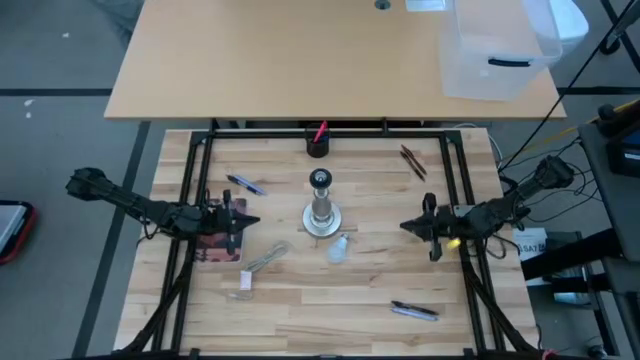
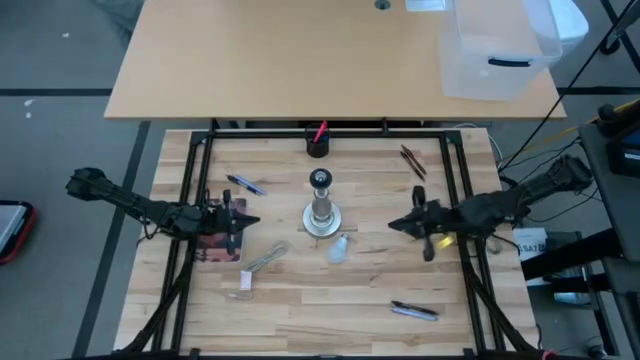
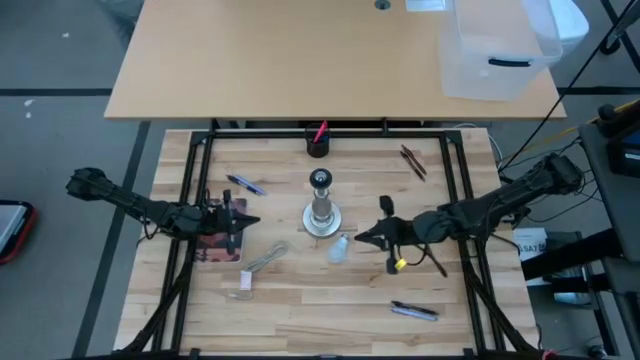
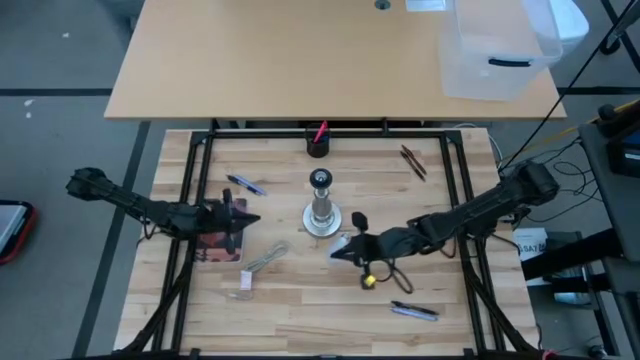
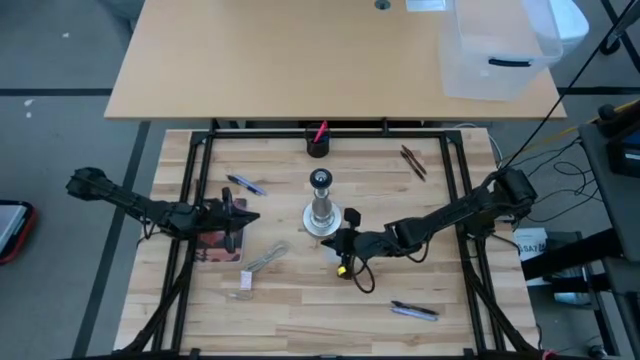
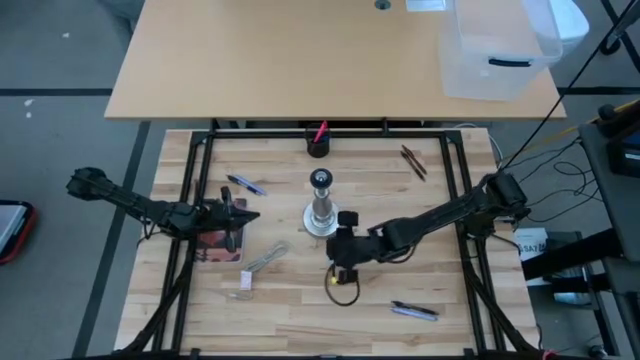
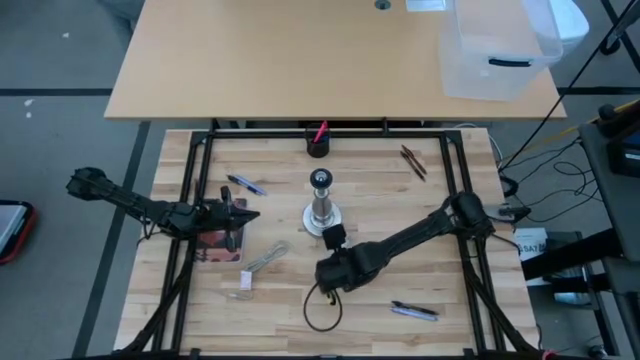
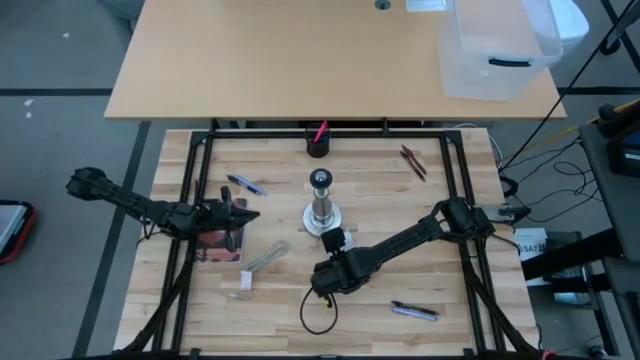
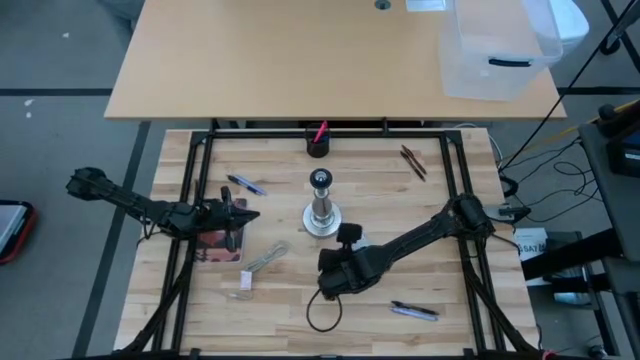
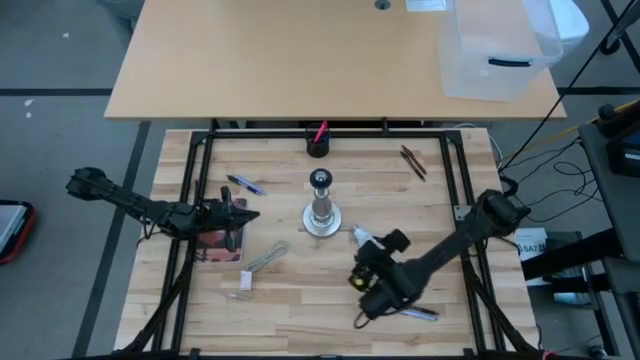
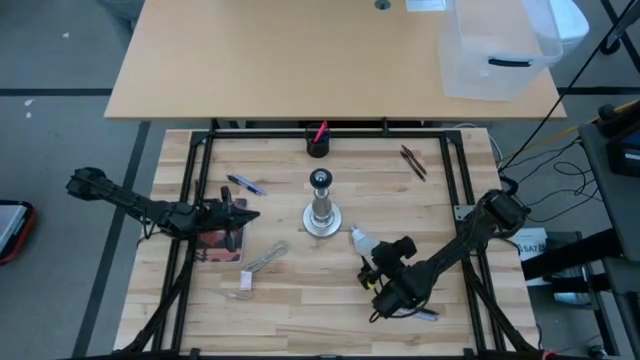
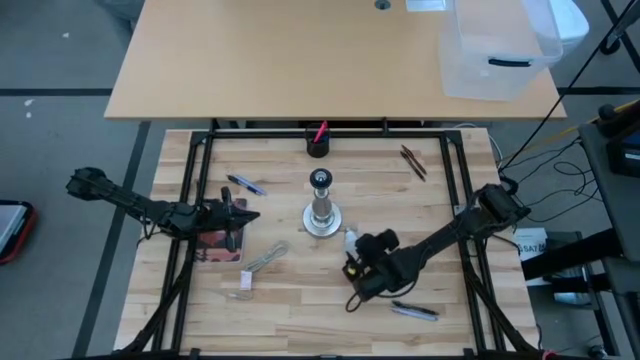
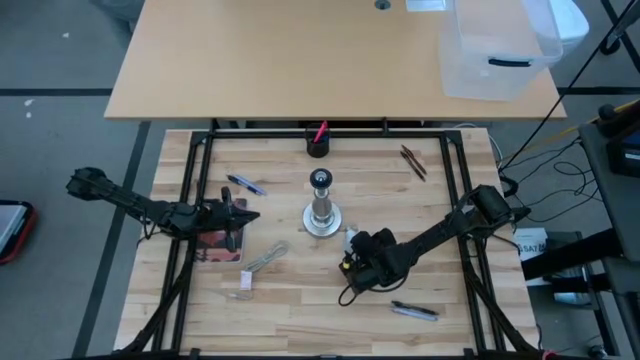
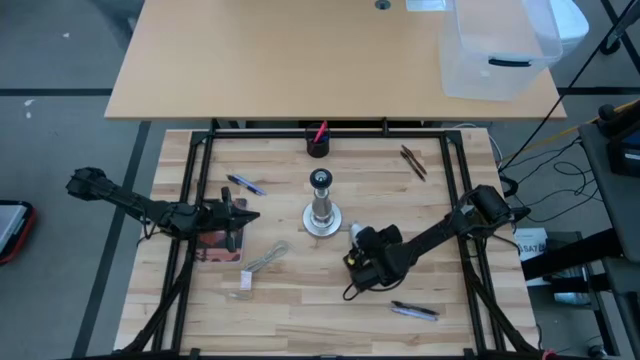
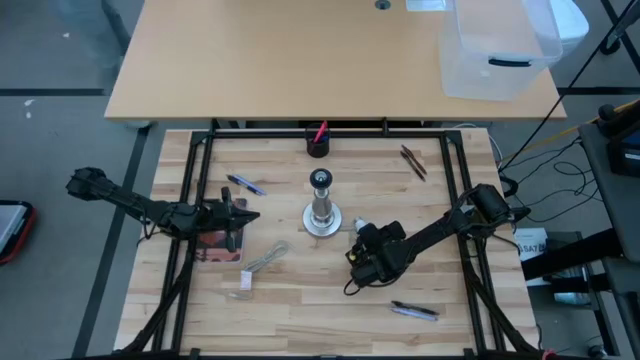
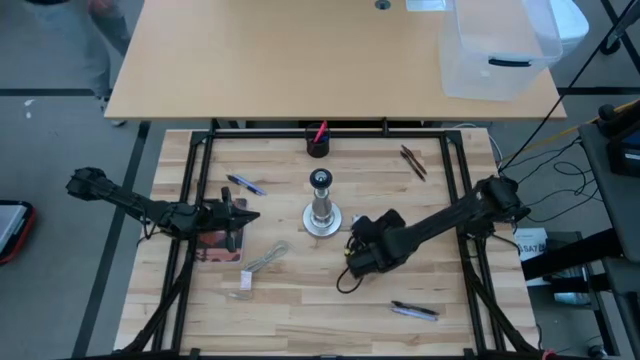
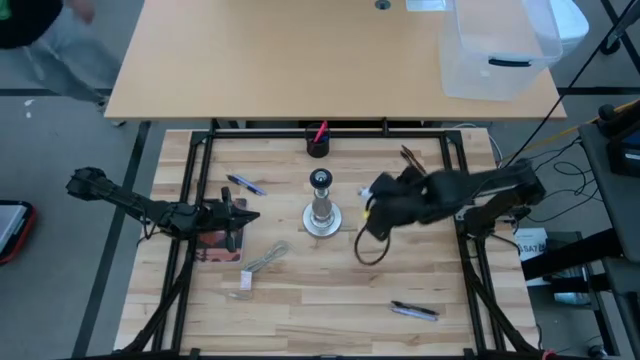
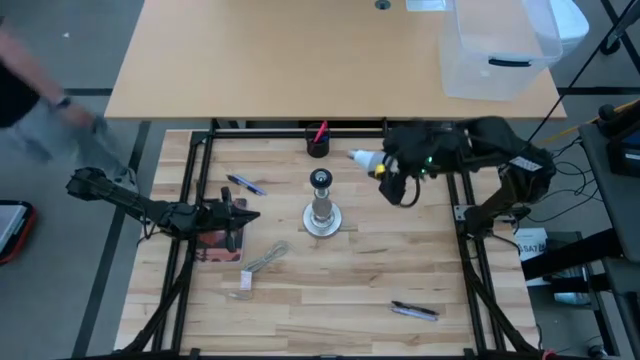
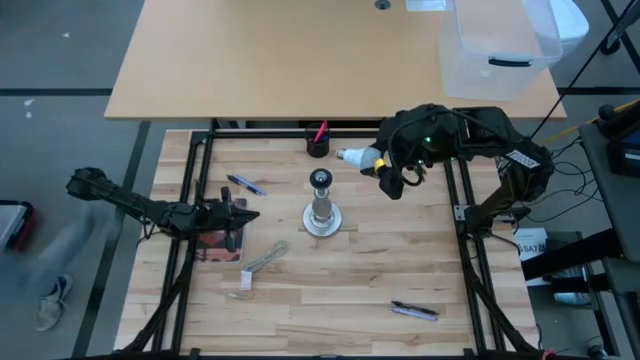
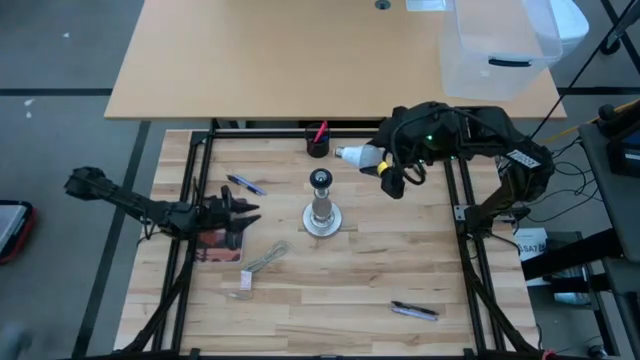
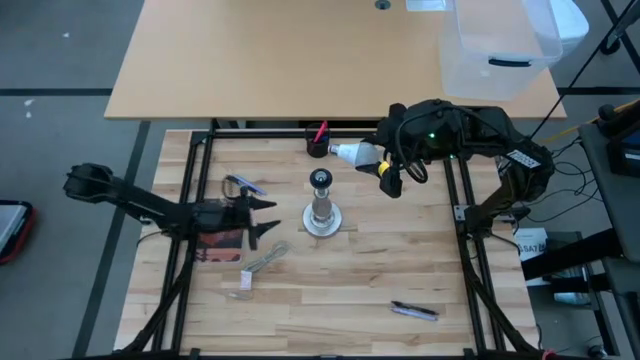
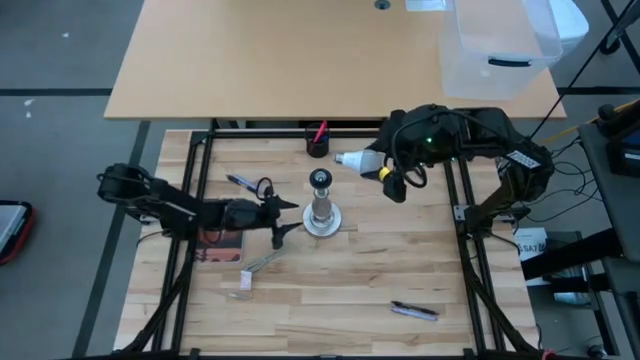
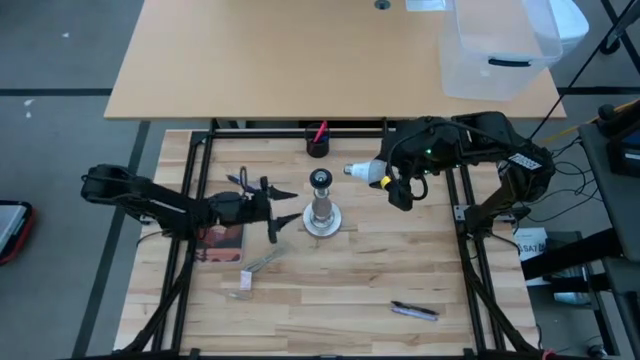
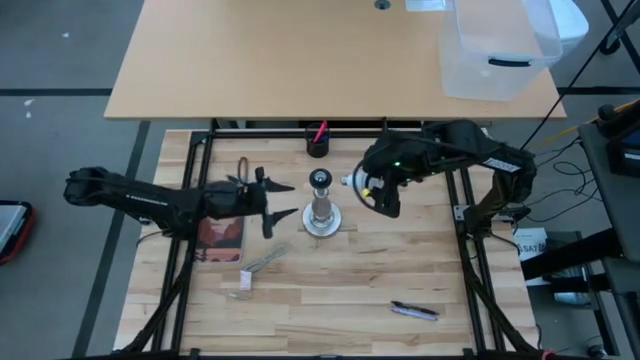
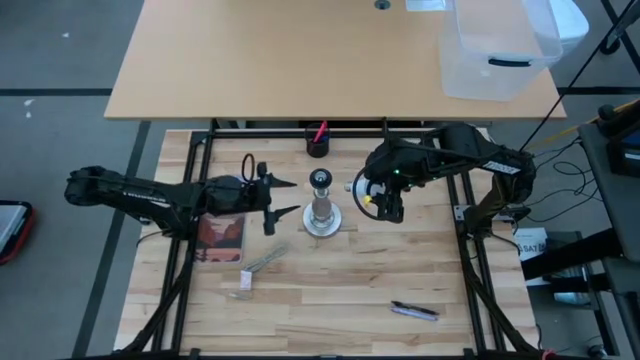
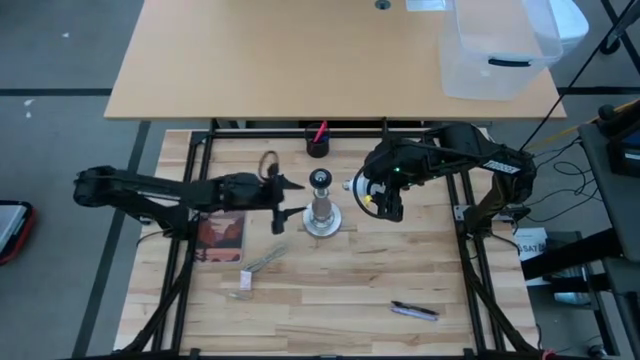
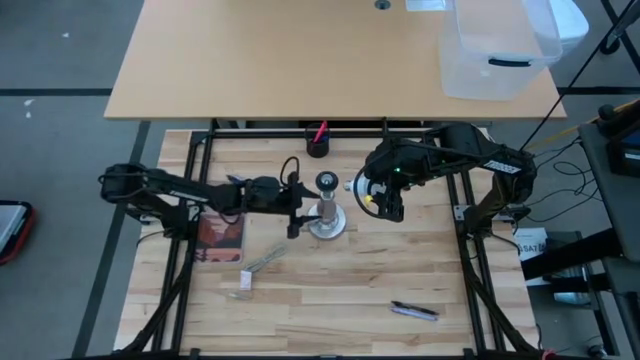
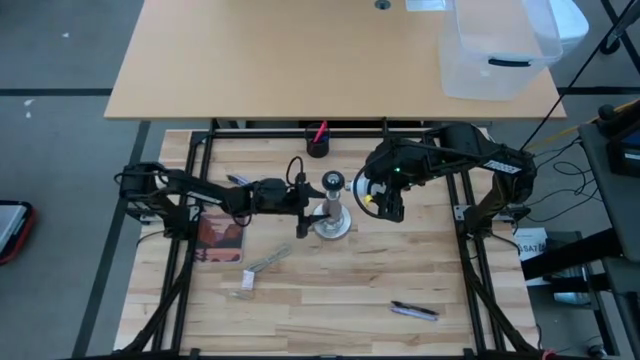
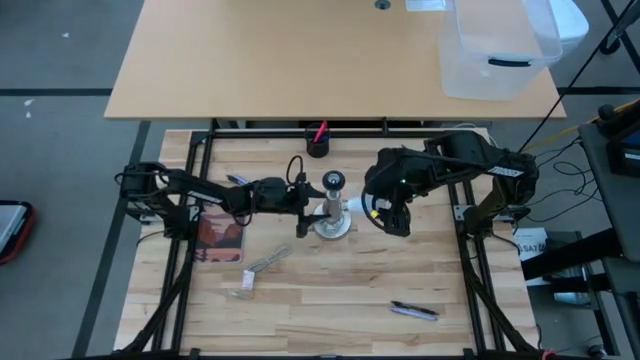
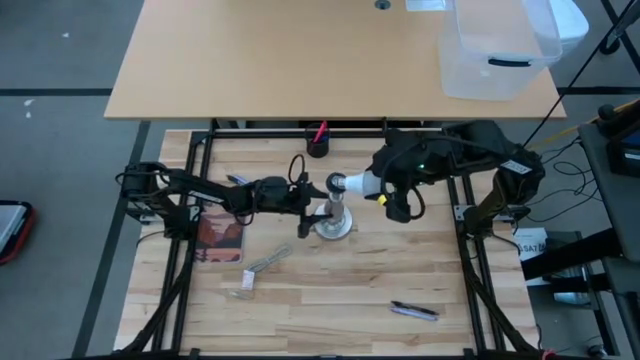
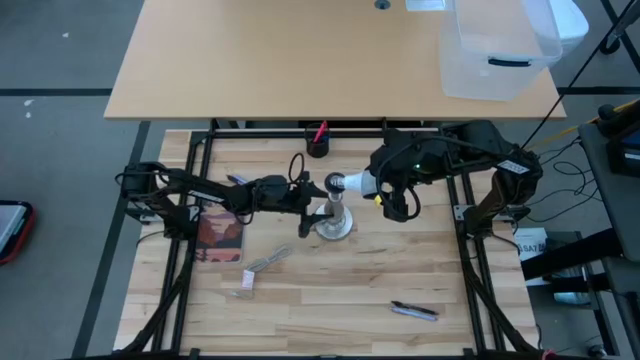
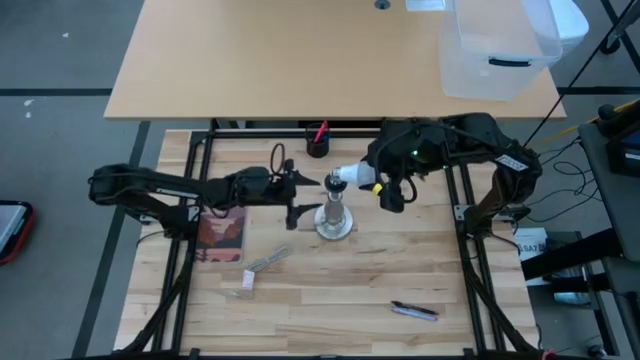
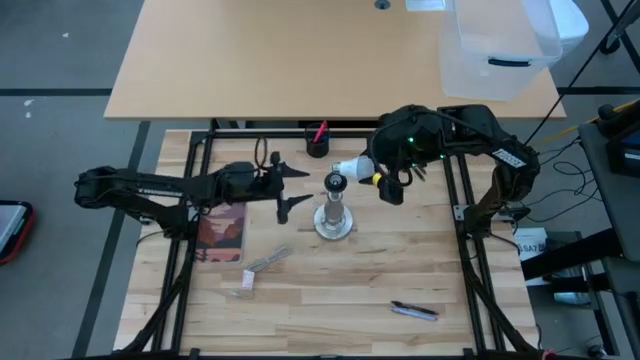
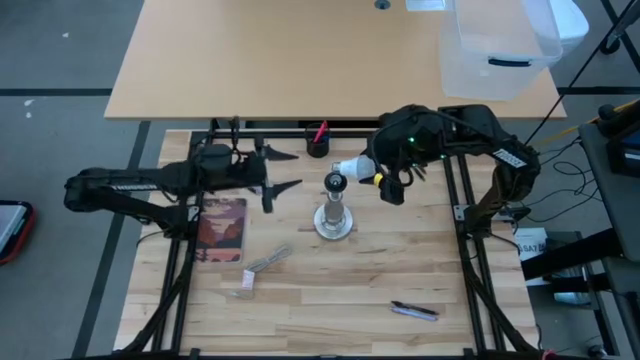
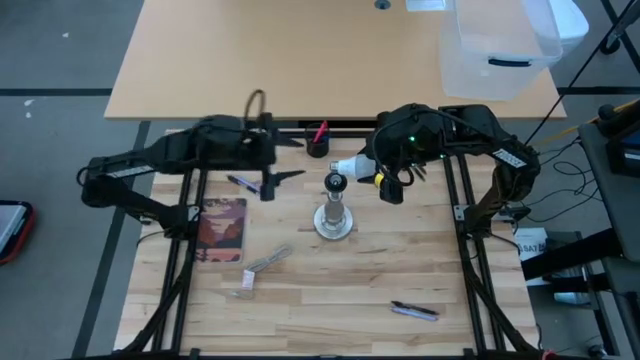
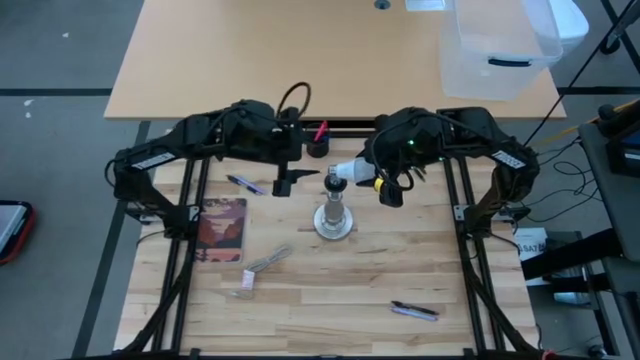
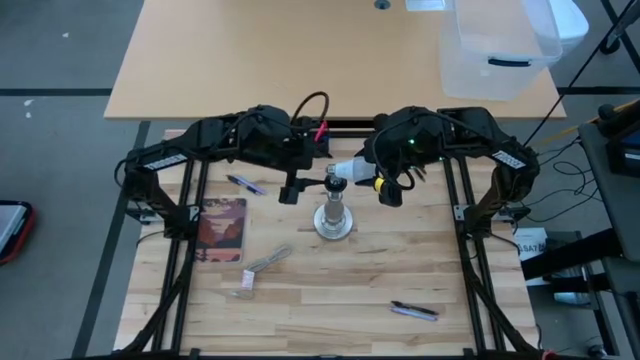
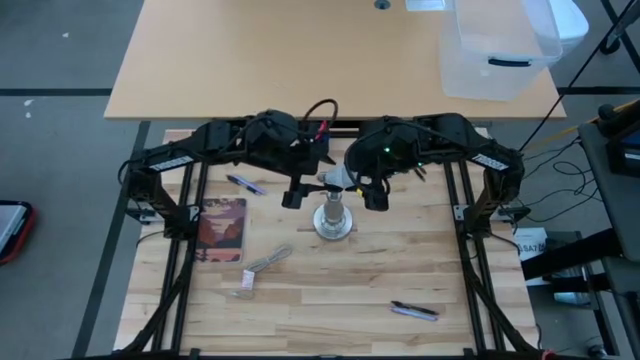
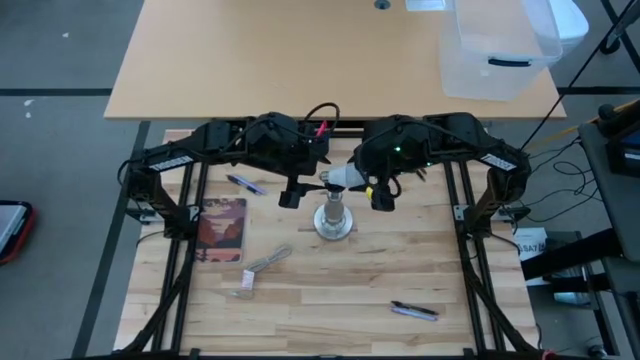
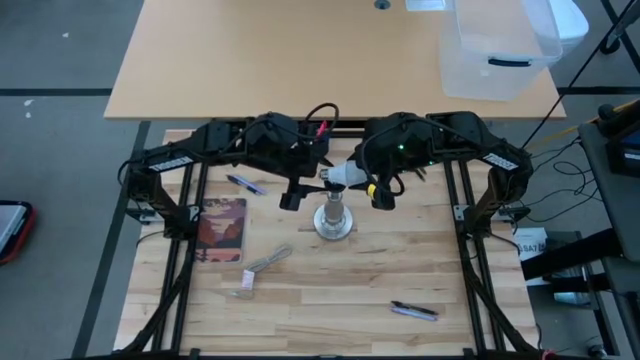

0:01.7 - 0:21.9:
Task: Screw lightbulb
Insert the lightbulb into the desk lamp
